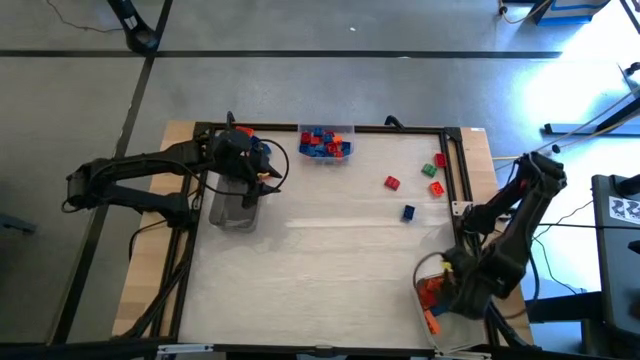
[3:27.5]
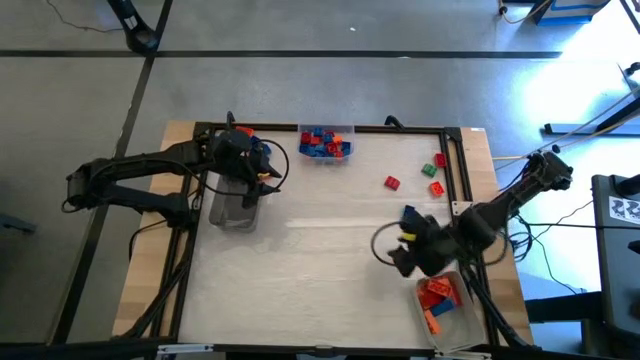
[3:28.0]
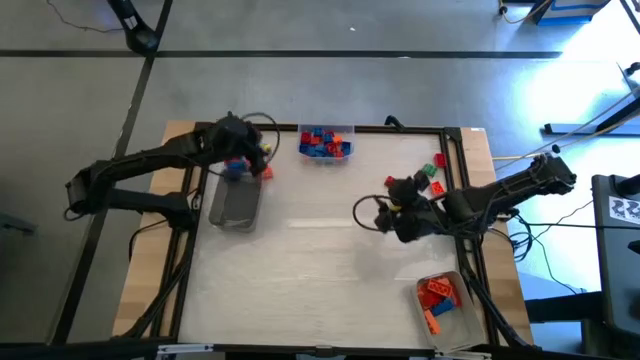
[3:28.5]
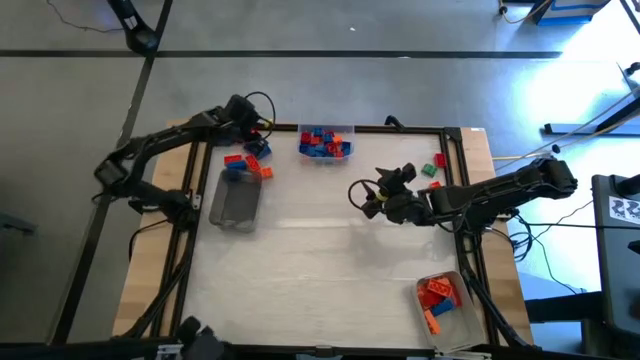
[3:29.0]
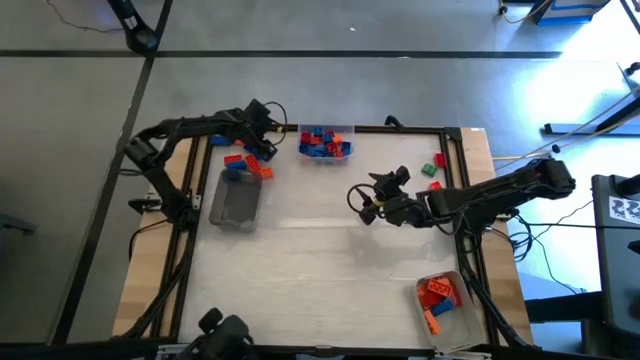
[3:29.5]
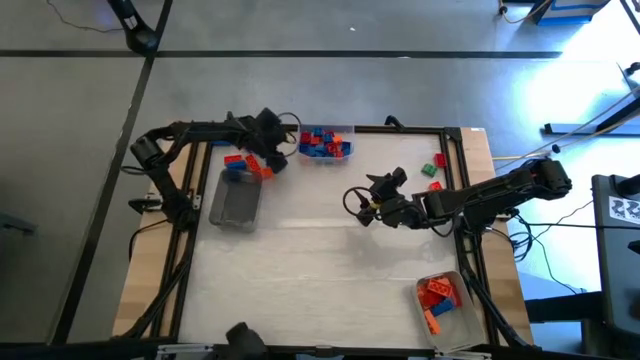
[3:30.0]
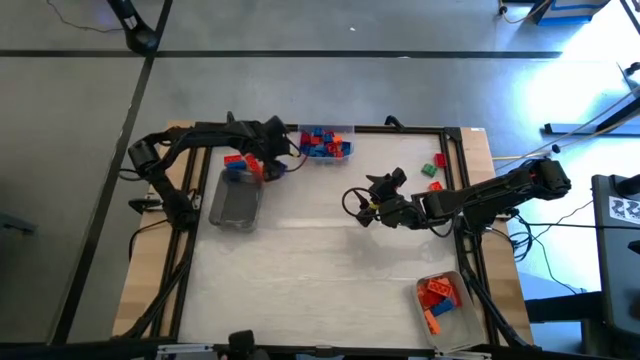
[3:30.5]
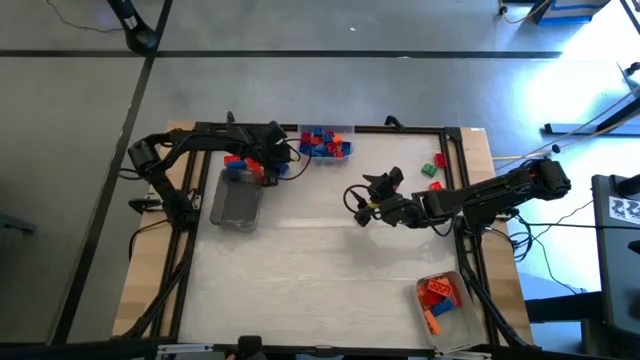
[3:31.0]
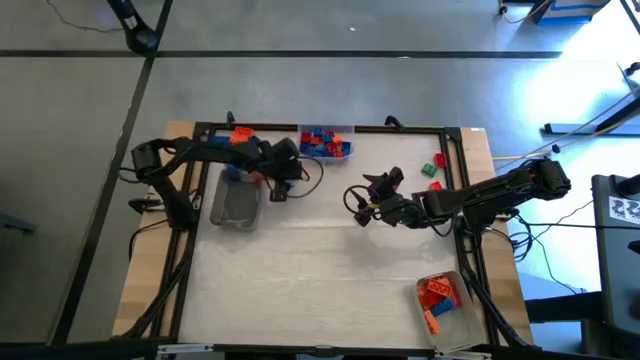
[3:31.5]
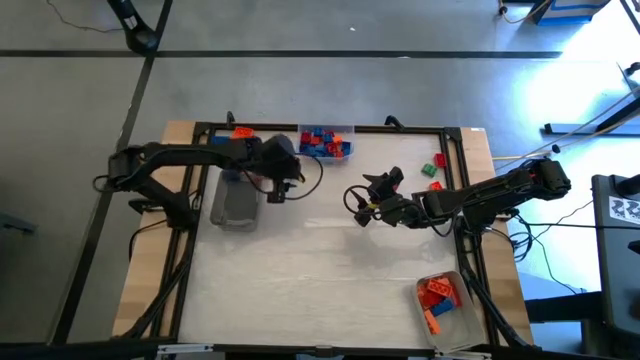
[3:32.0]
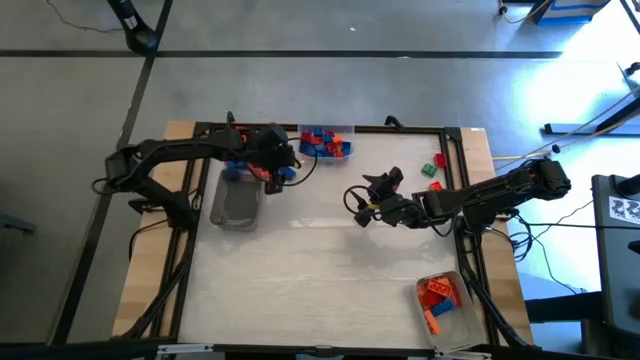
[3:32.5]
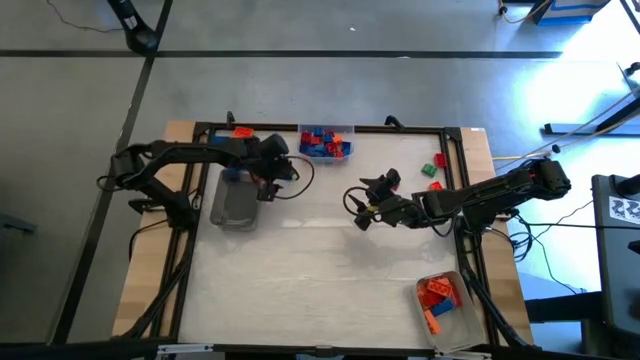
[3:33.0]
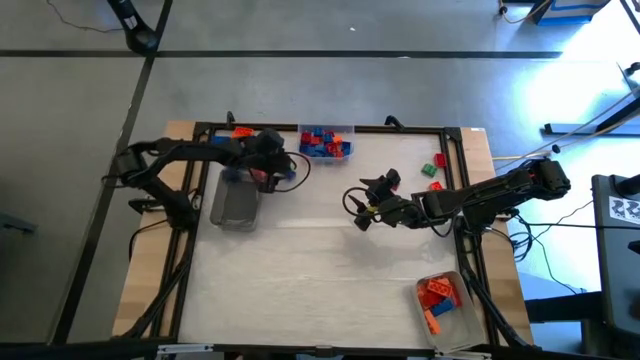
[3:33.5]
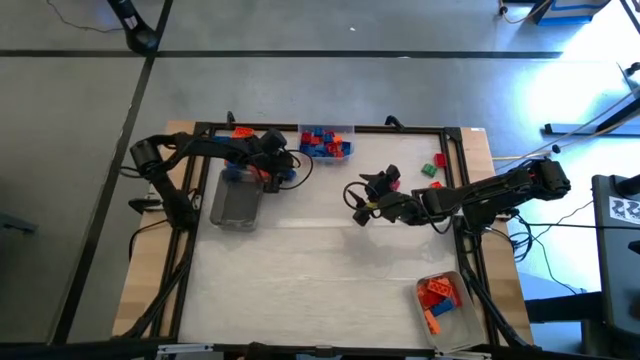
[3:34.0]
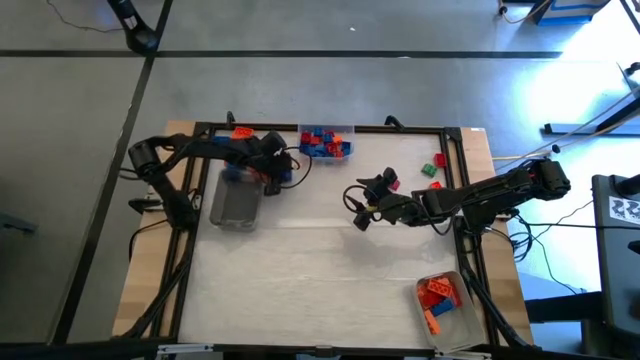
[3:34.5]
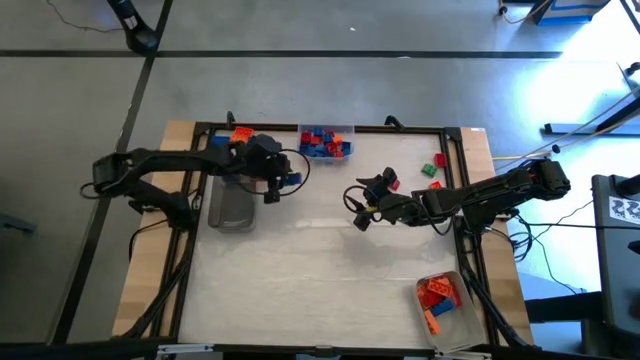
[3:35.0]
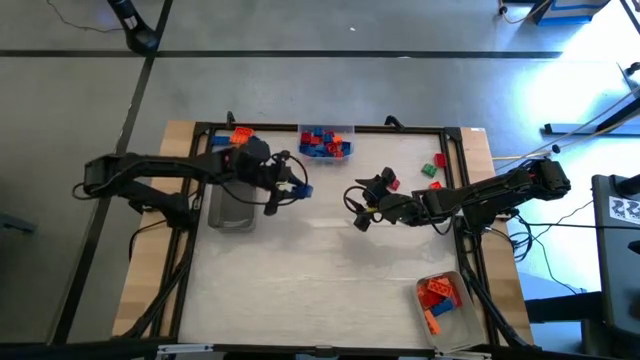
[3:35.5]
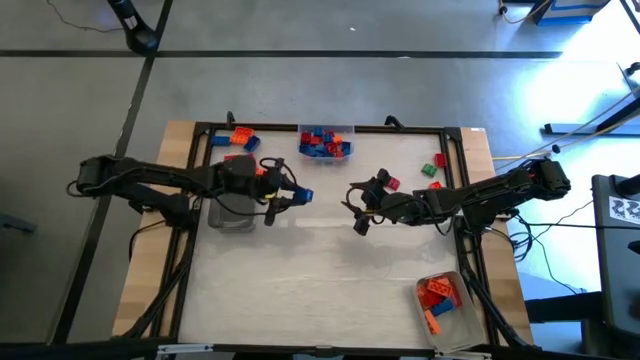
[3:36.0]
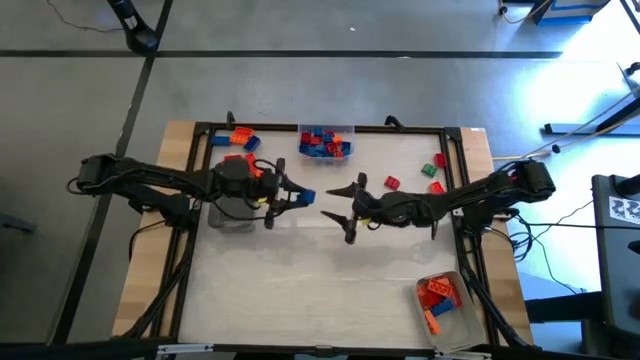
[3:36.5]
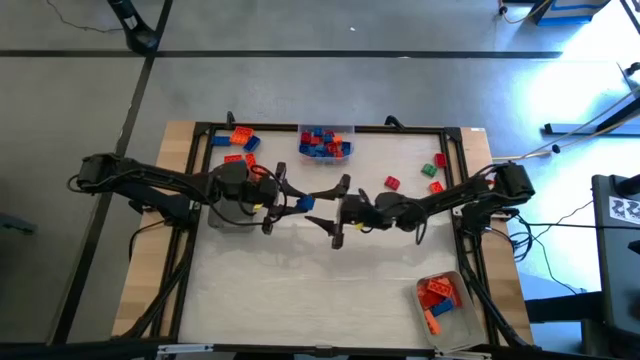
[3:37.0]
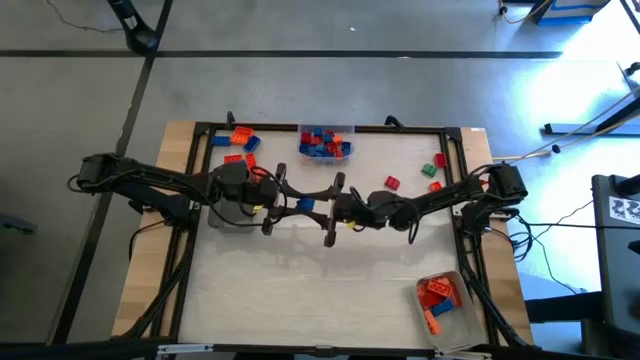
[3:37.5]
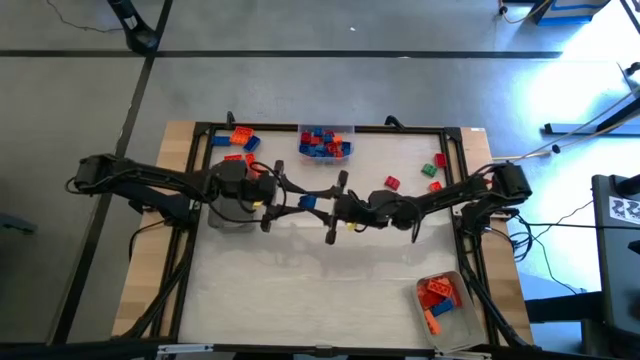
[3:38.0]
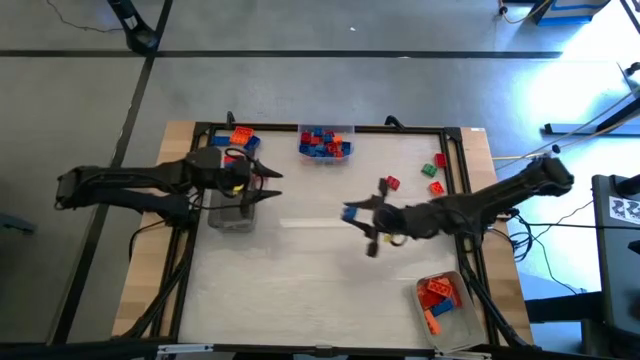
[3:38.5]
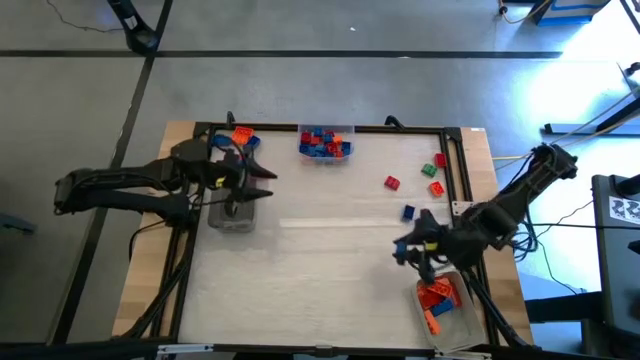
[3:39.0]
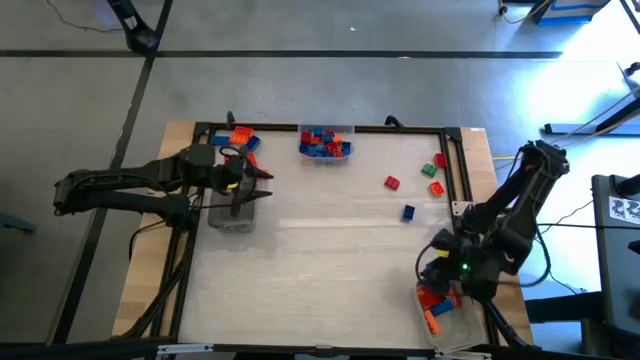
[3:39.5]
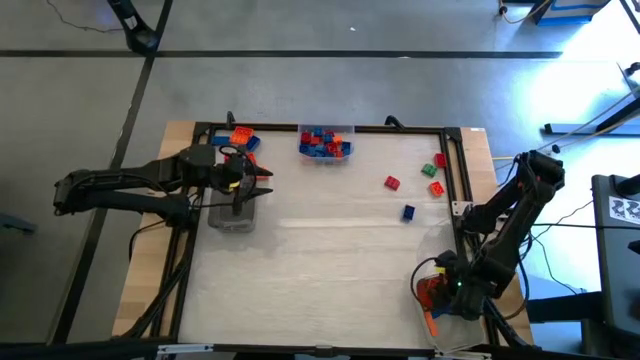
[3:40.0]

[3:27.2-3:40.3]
Task: Sort blocks by size
Put the blue 8 stud game piece into the gray bin

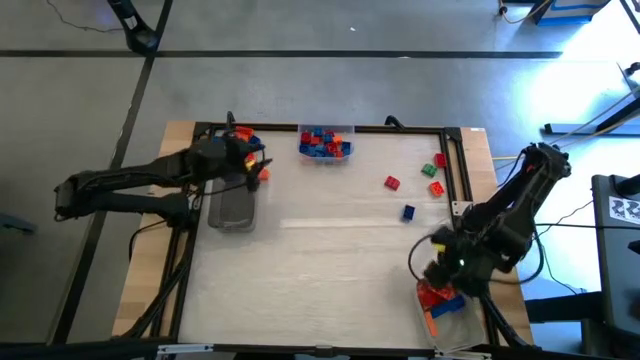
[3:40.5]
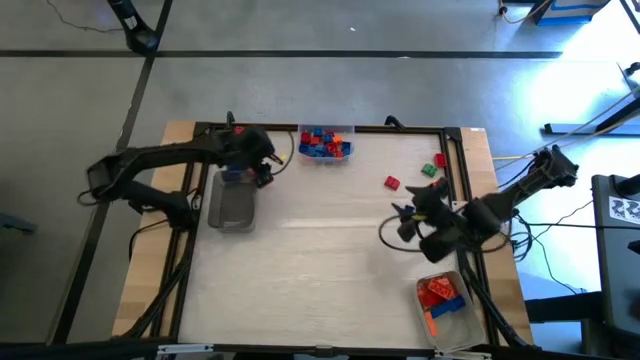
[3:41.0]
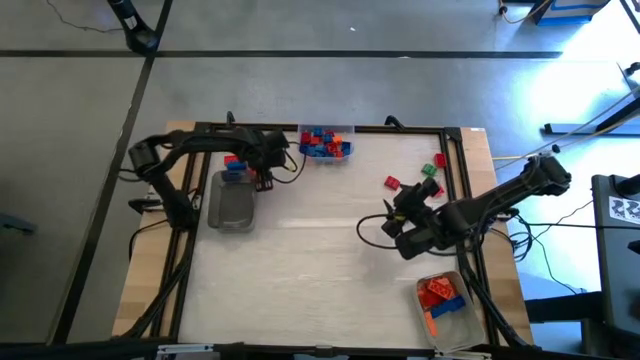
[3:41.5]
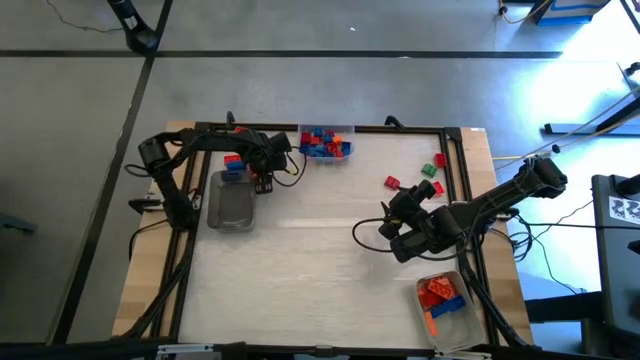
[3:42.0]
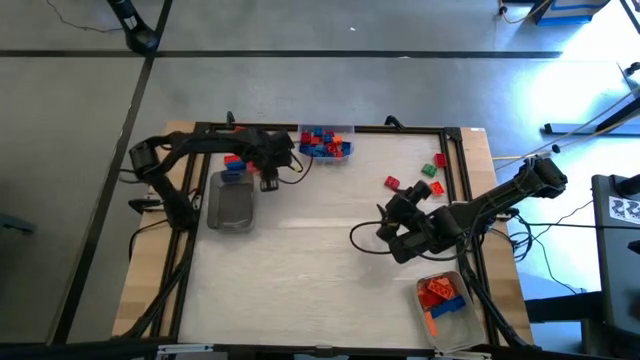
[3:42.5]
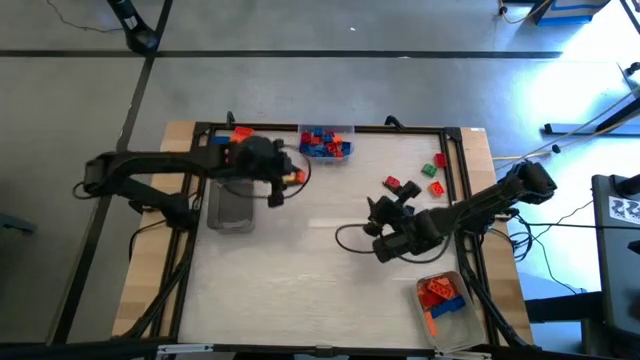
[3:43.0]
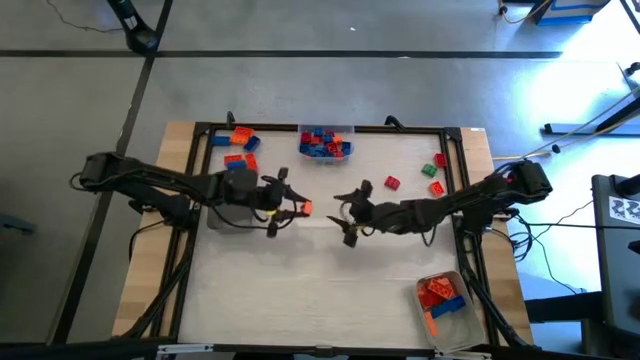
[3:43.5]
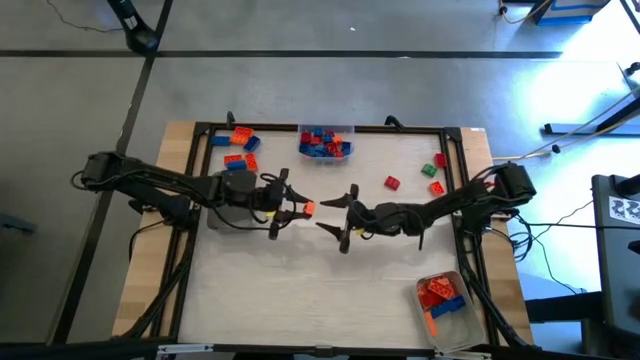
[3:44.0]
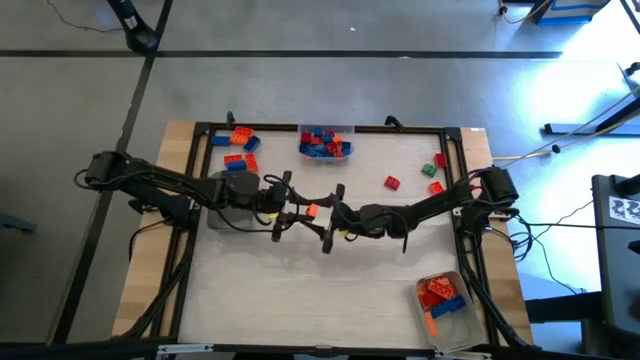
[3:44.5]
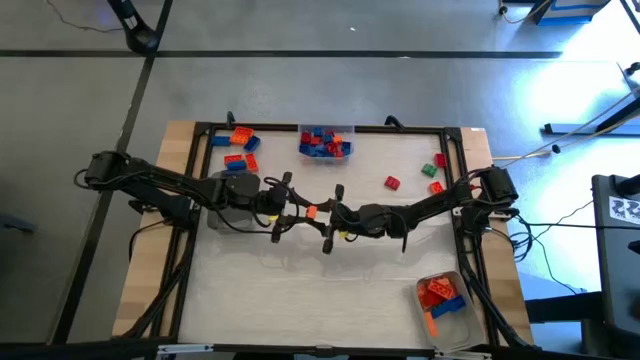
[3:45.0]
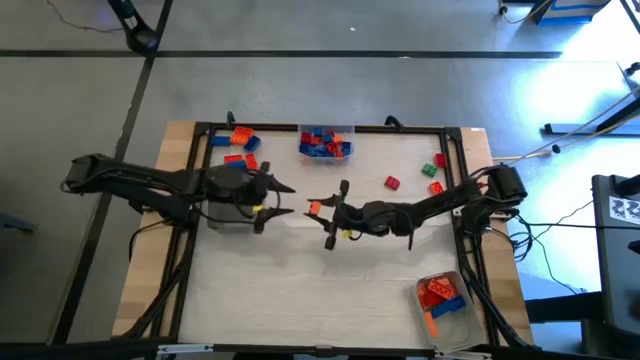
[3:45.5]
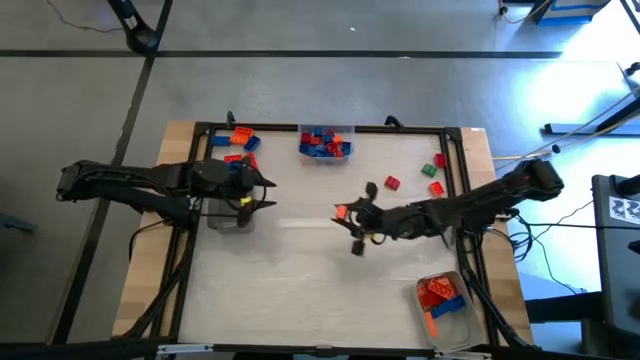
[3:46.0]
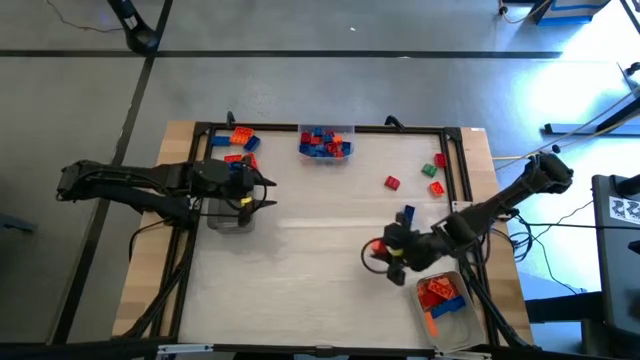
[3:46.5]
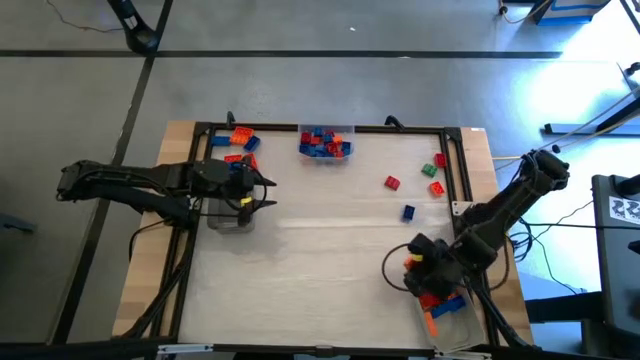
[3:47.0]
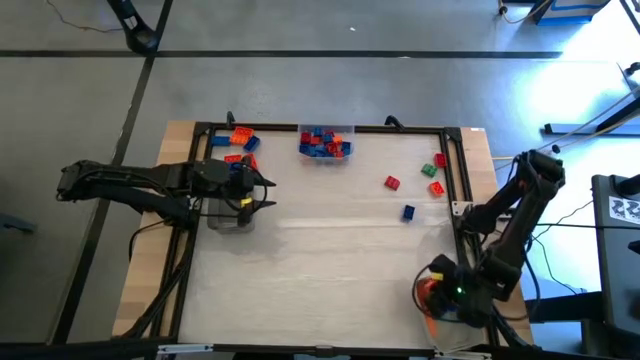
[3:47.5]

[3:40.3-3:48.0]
Put the orange 8 stud game piece into the gray bin

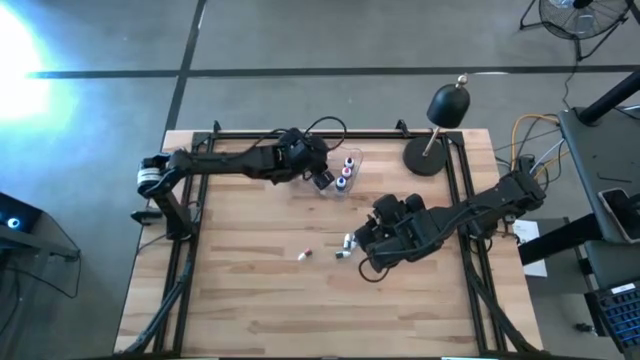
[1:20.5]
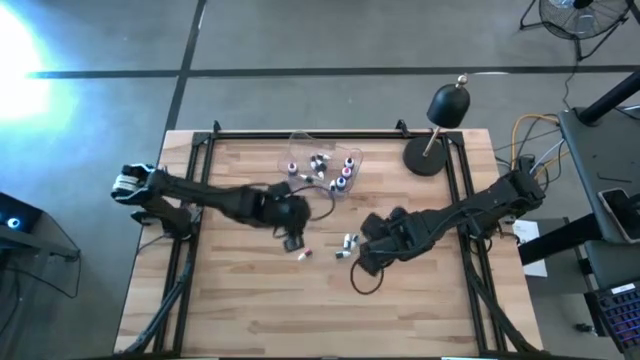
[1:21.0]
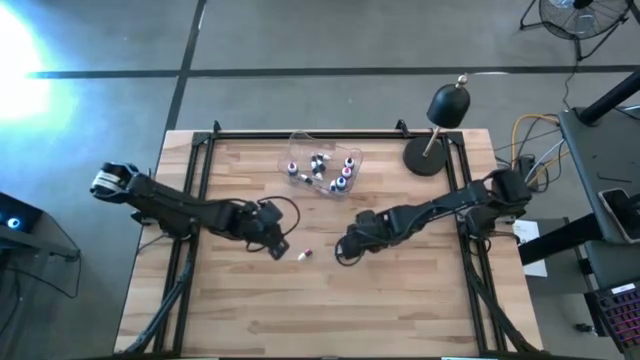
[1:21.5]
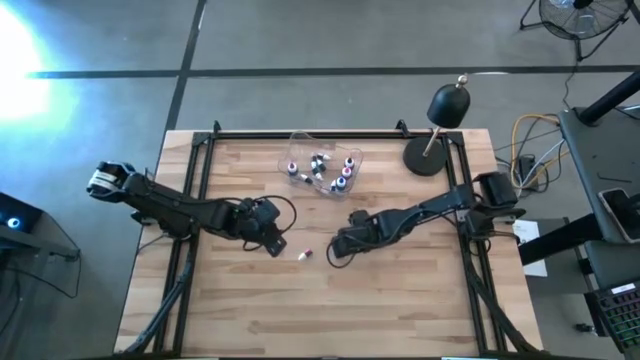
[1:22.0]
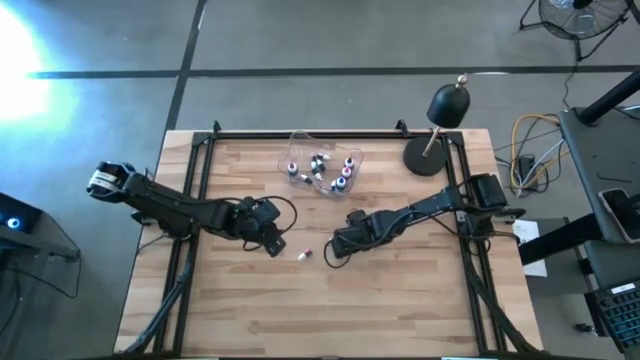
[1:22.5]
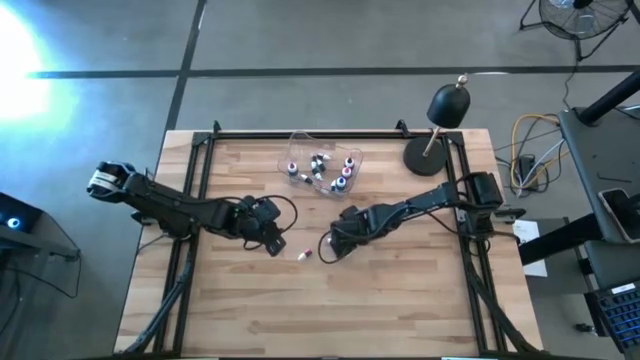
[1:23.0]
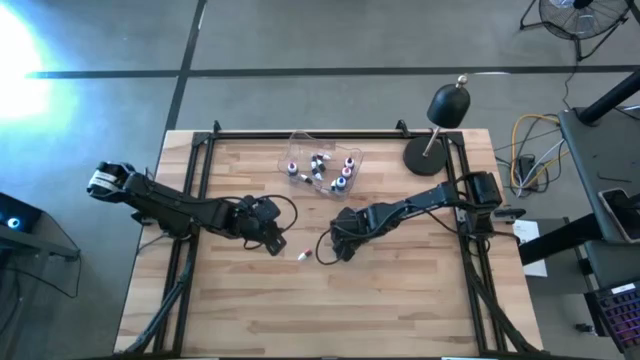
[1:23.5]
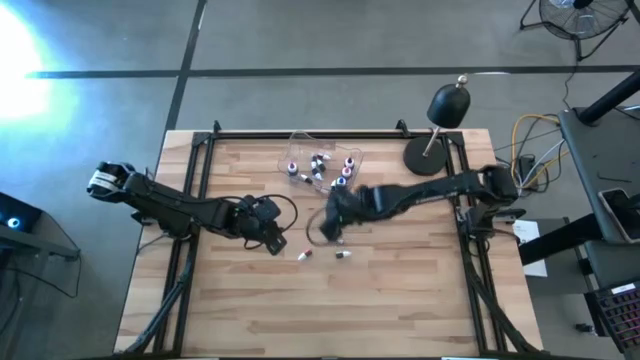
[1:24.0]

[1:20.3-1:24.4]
Task: Pick & Place food coloring
Put the small blue food coloring bottle into the transparent bin
